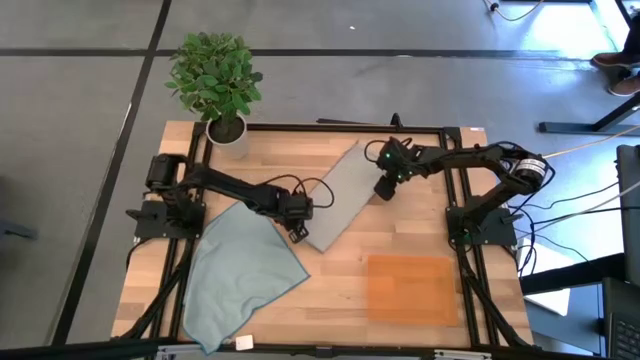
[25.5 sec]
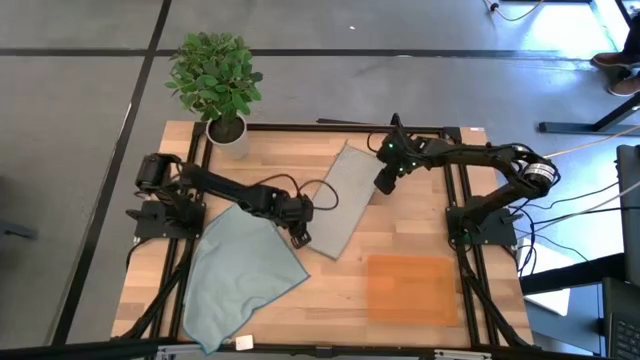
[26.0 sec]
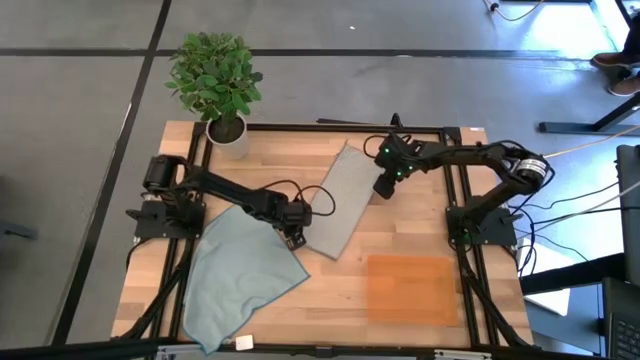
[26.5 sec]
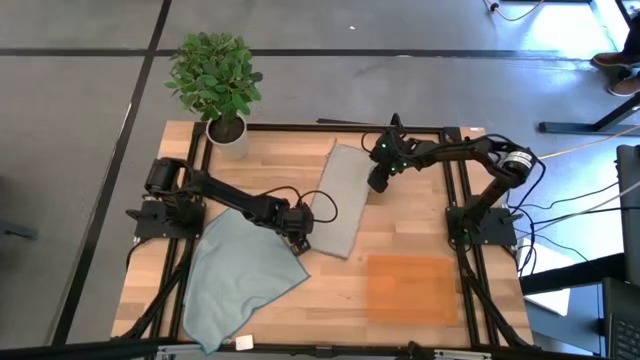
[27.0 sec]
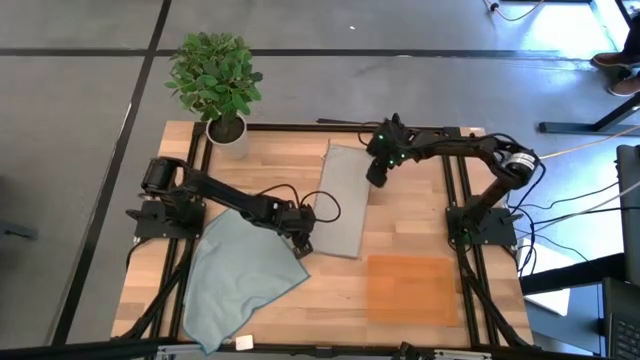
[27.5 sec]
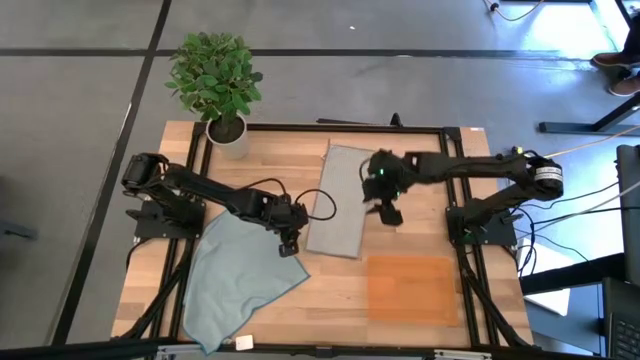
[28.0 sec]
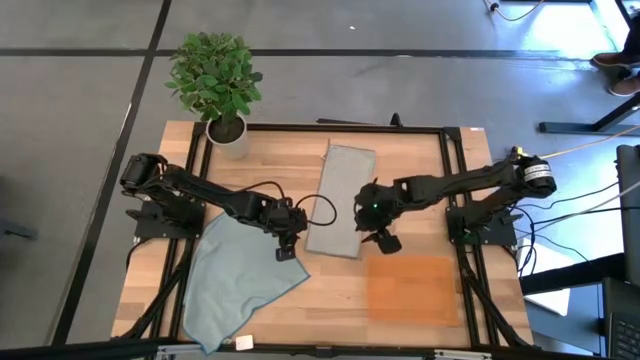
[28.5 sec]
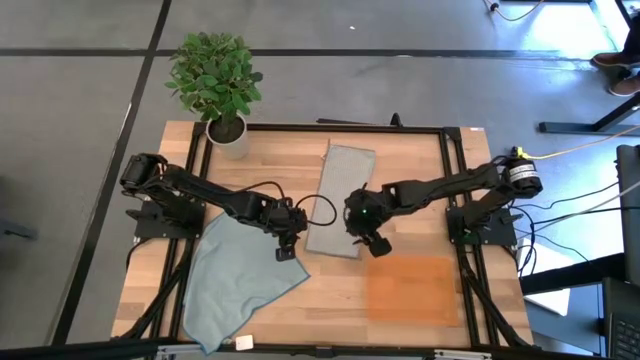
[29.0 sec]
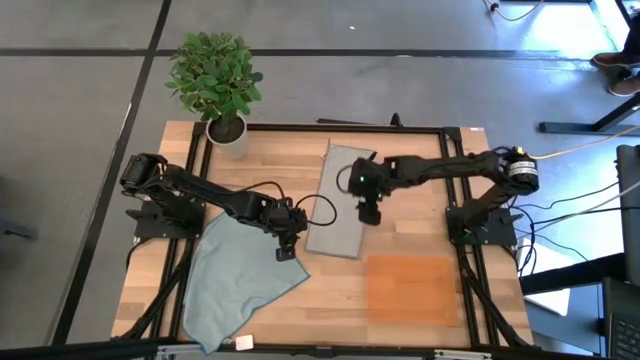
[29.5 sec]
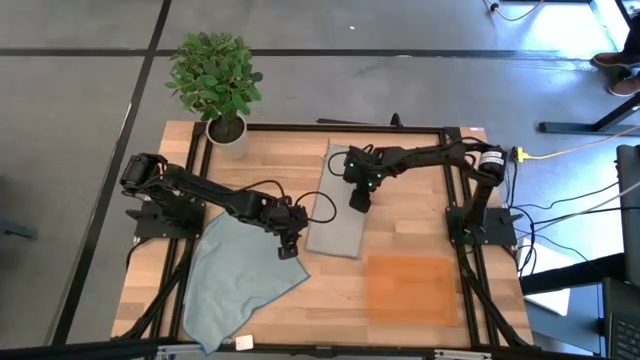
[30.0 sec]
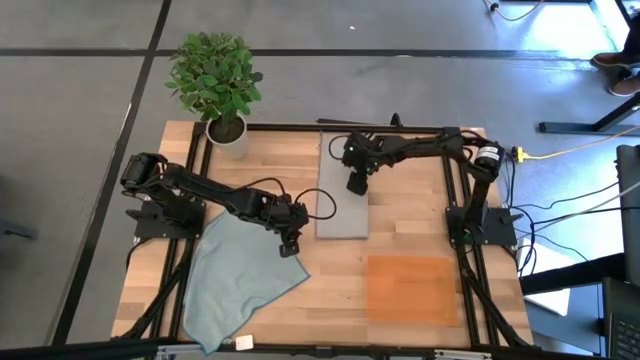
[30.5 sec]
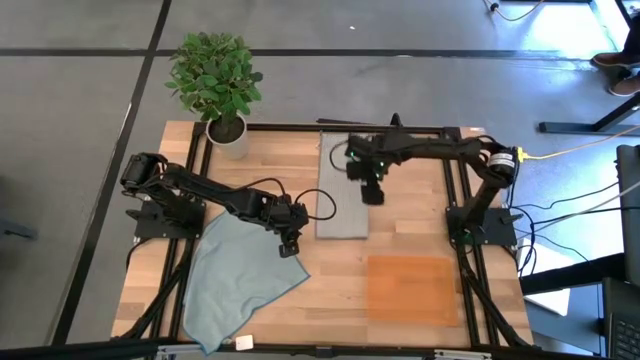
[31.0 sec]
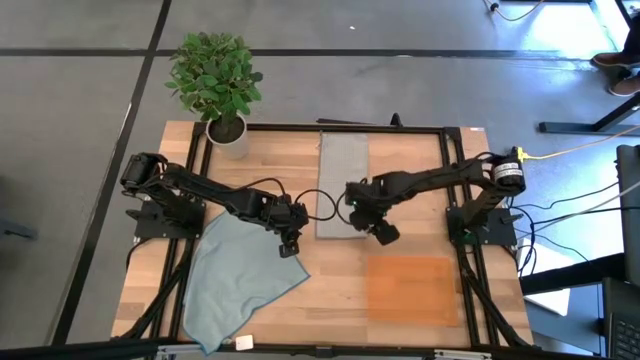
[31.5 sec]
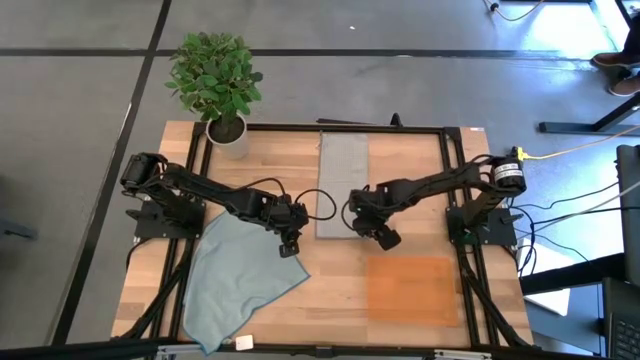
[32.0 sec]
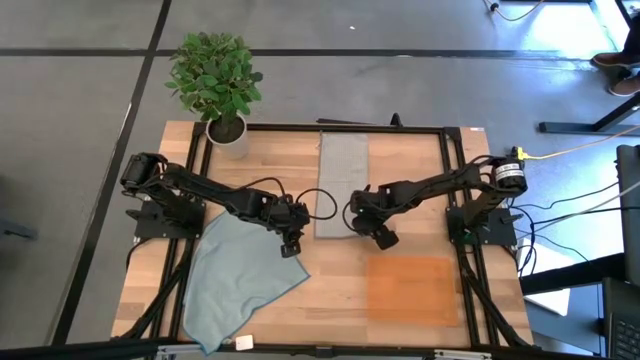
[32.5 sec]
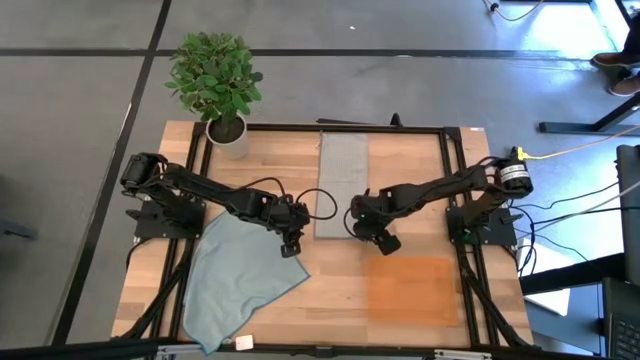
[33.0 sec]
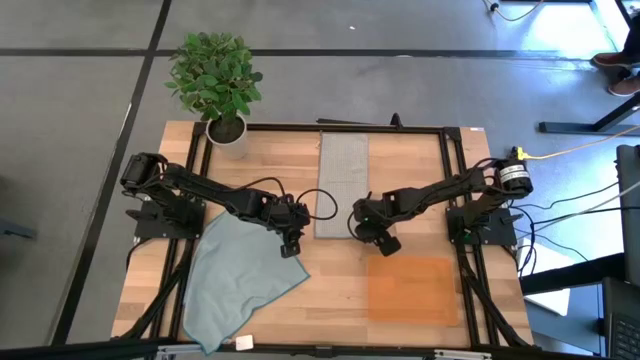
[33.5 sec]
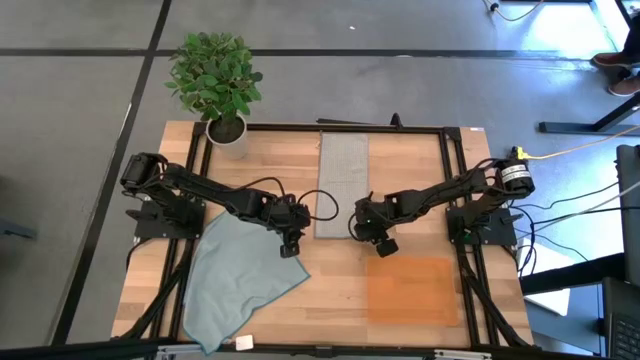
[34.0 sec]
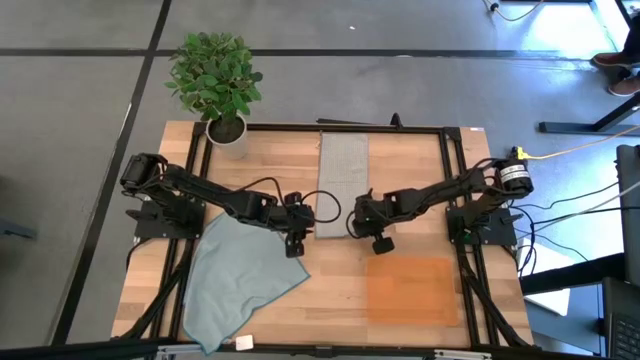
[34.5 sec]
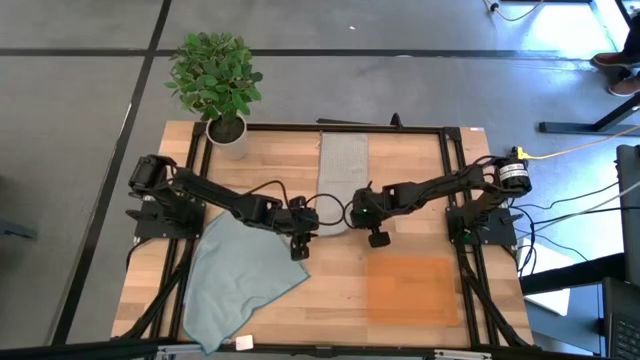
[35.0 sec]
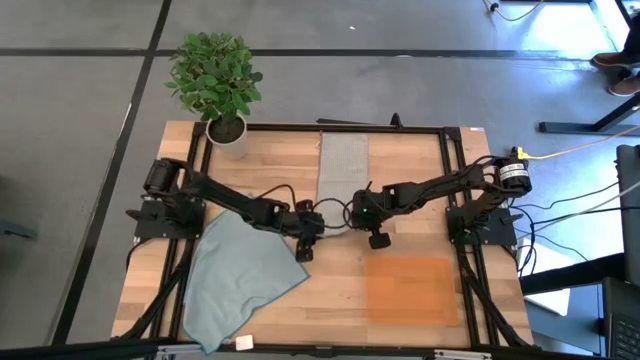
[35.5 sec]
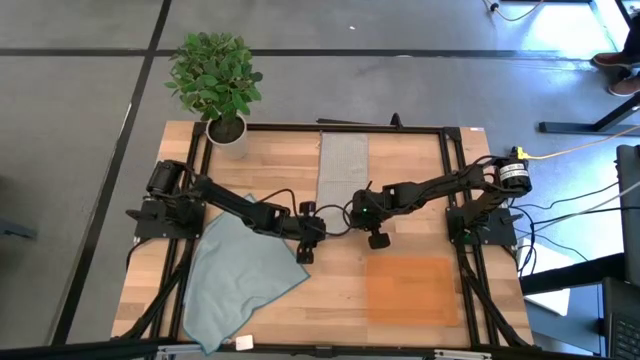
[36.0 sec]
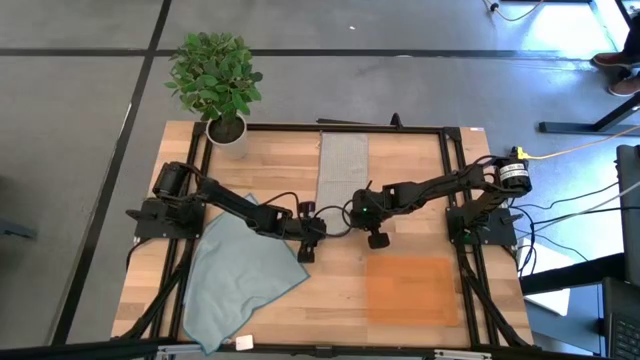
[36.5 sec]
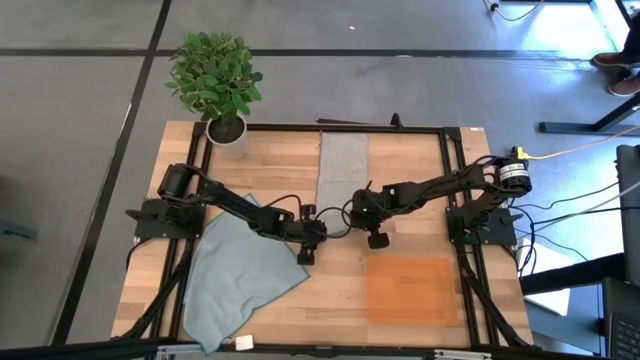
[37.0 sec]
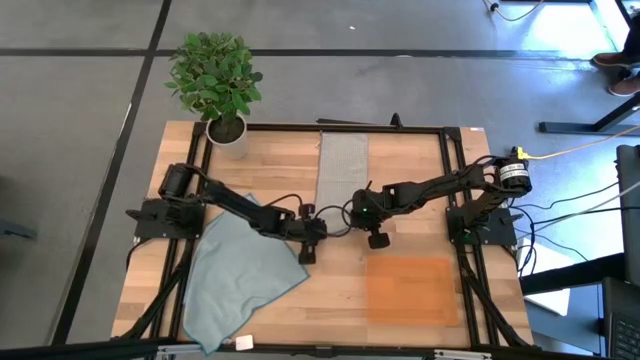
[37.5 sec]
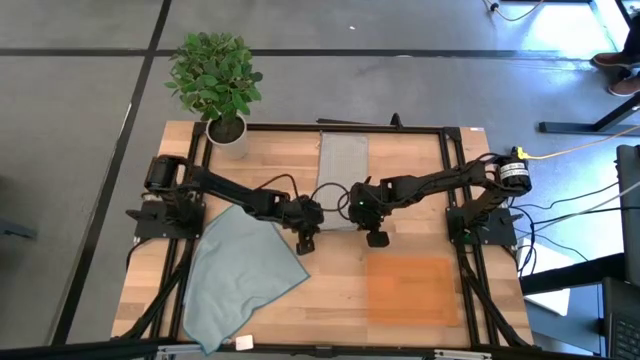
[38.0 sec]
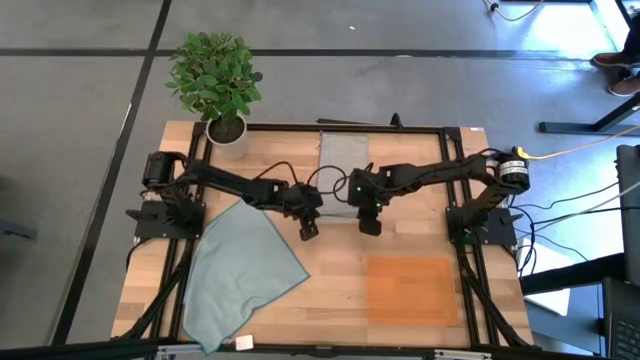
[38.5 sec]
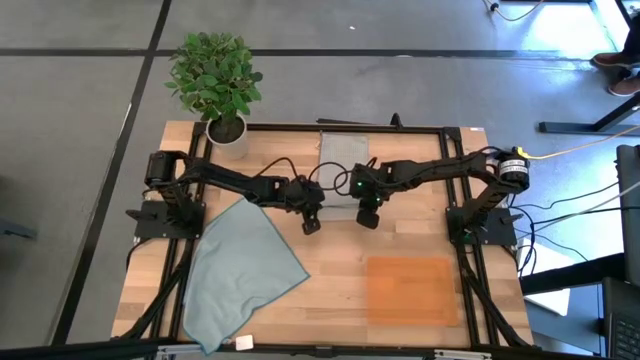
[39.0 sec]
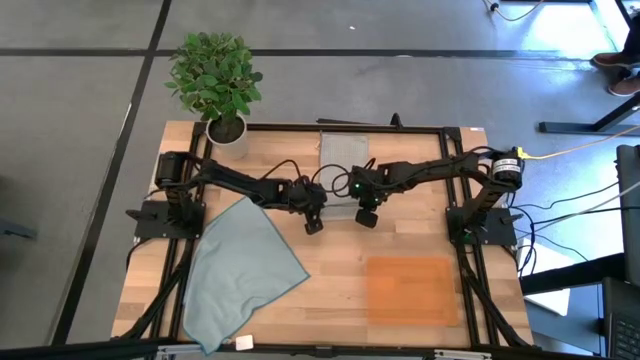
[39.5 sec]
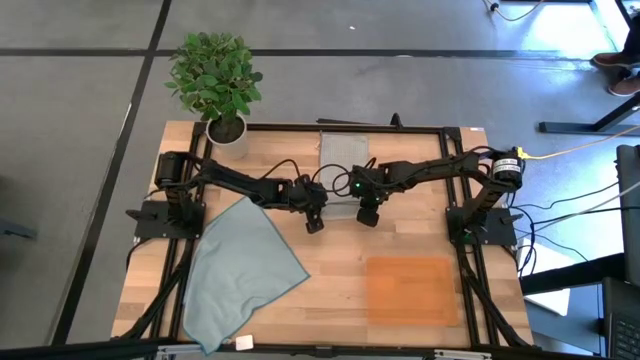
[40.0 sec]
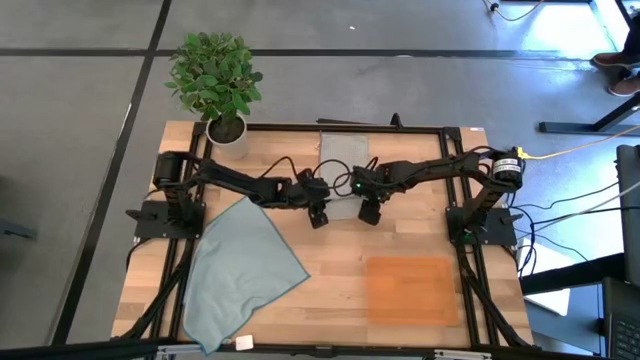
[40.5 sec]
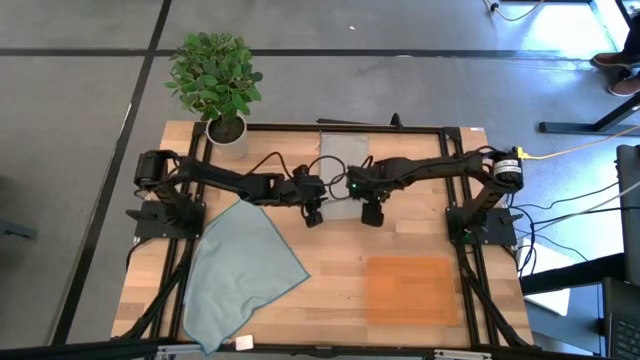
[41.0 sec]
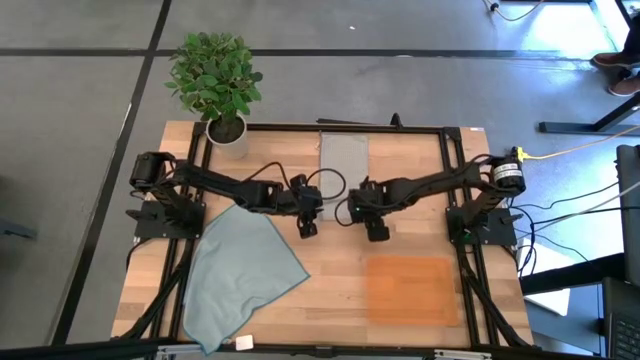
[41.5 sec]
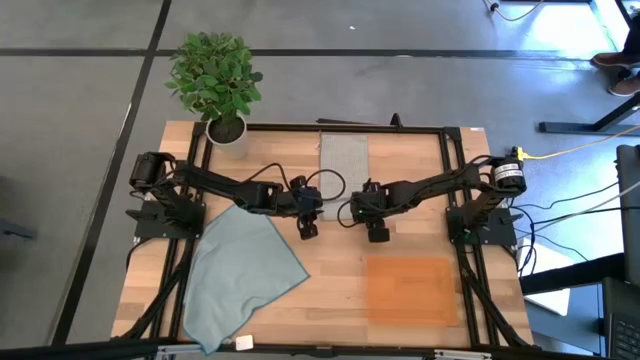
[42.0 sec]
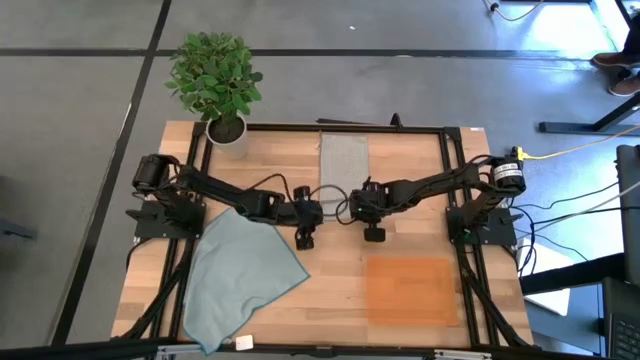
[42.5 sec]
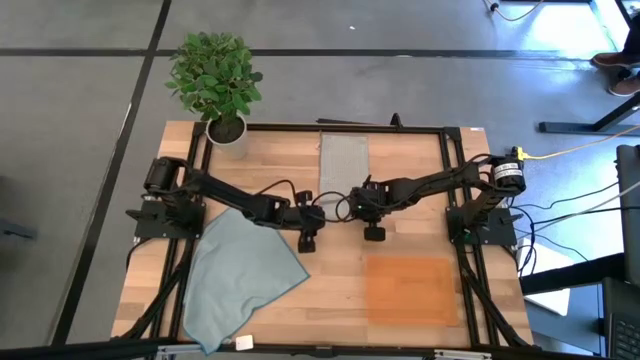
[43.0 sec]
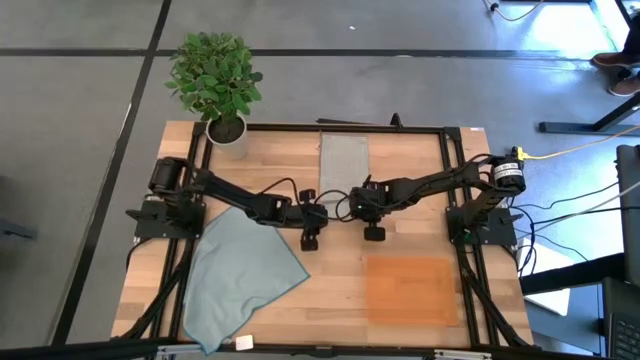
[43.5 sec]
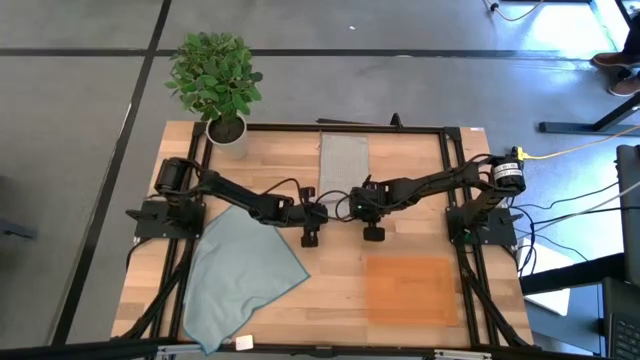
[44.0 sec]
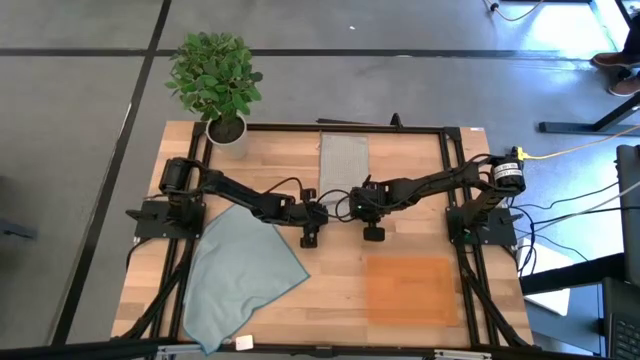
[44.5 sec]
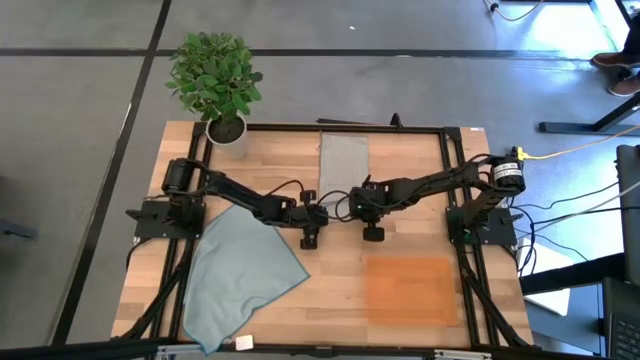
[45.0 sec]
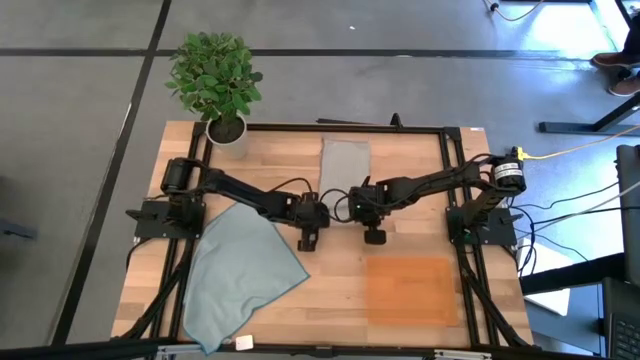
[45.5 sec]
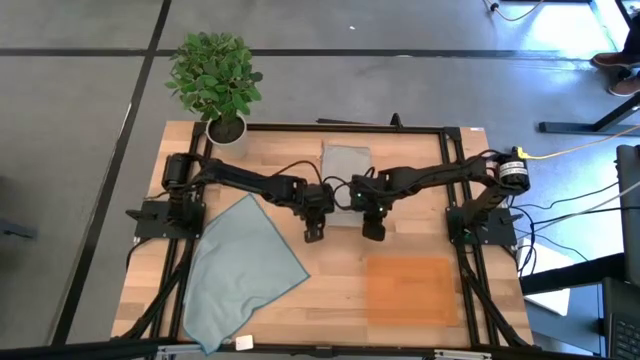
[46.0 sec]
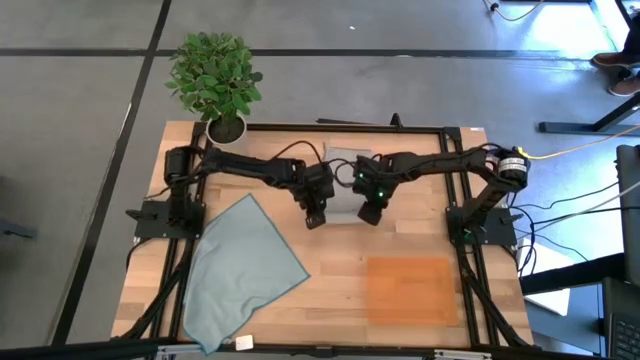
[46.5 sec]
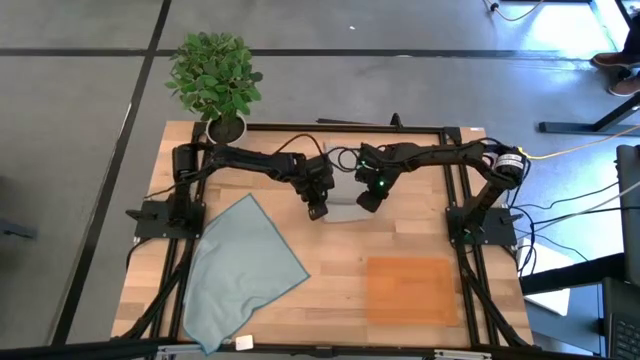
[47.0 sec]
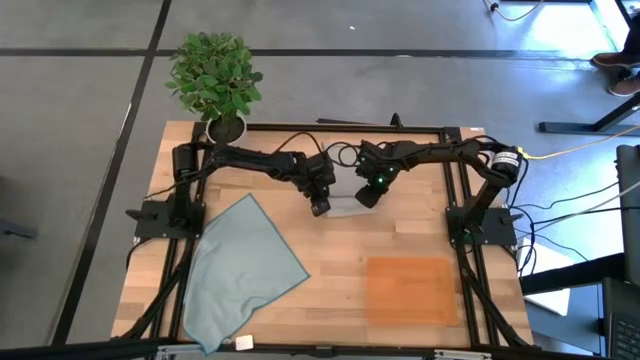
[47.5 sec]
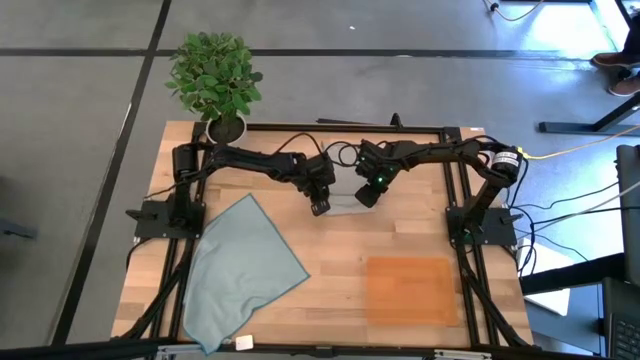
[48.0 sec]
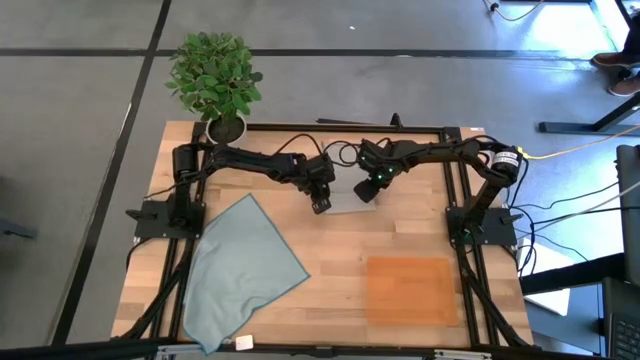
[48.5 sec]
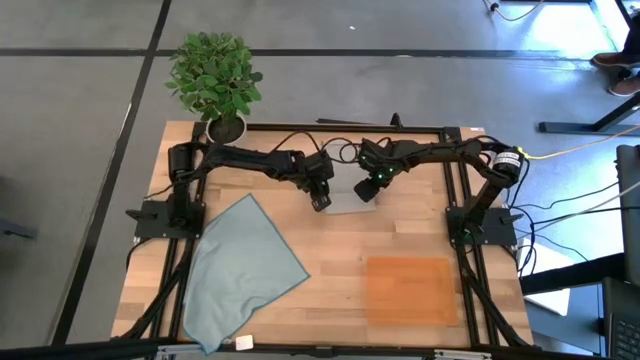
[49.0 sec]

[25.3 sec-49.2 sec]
Task: Roll microfiber towels into tight, uniform cylinder then place into a basket
Roll the gray microfiber towel
